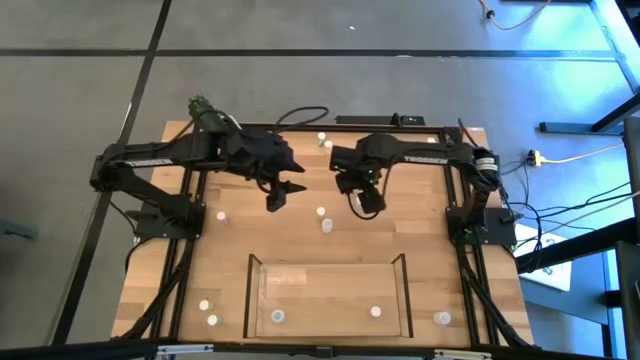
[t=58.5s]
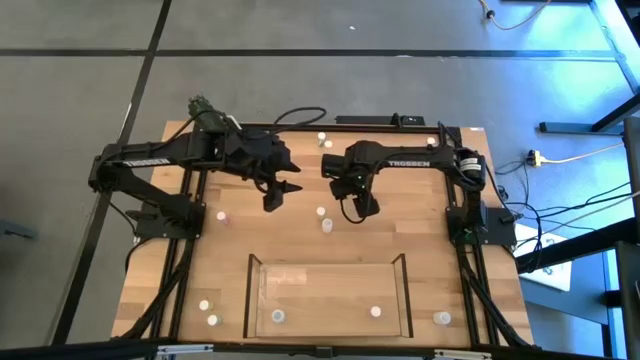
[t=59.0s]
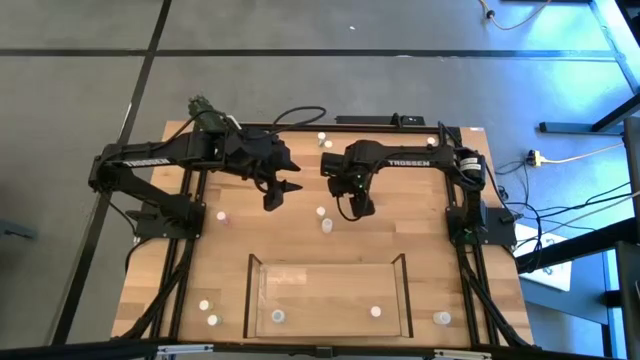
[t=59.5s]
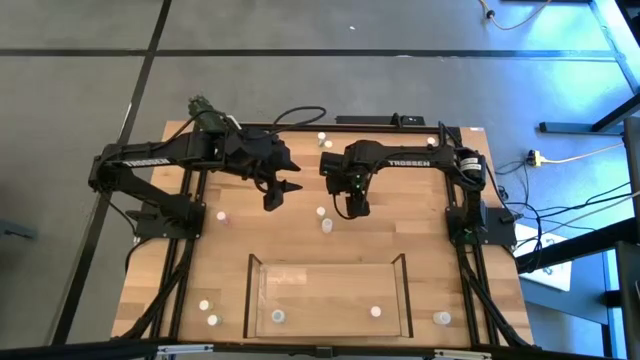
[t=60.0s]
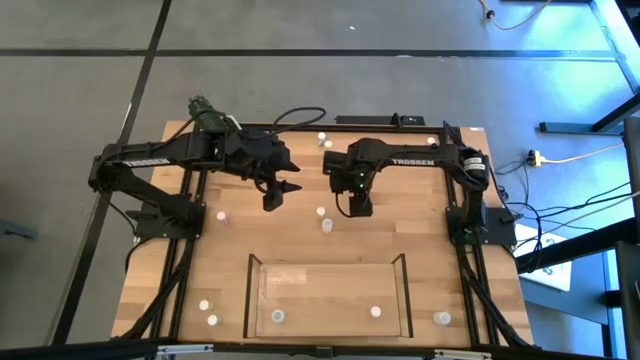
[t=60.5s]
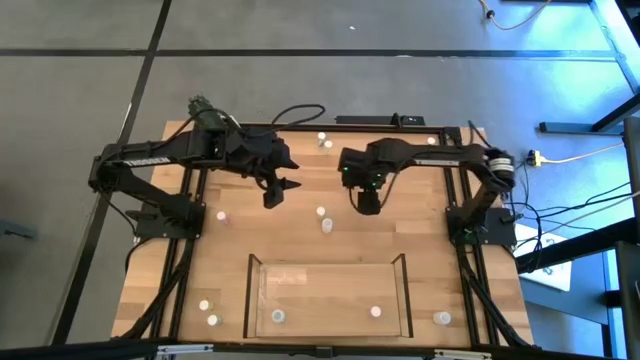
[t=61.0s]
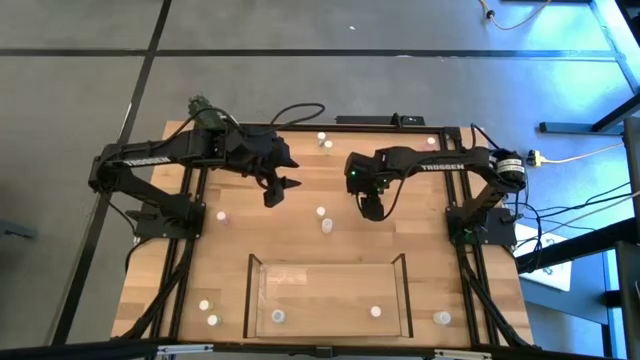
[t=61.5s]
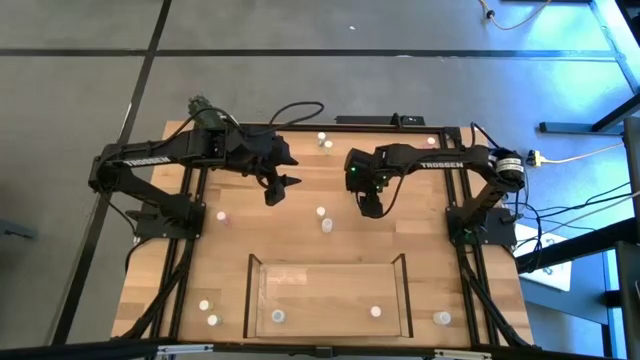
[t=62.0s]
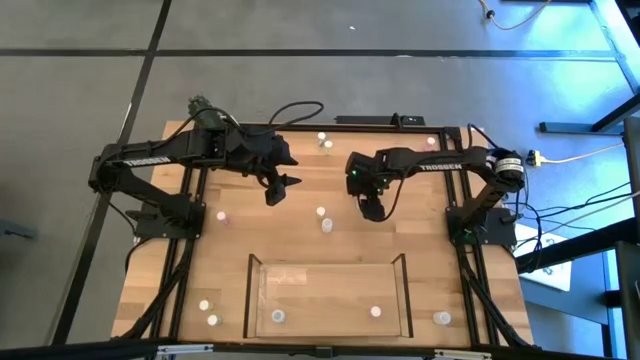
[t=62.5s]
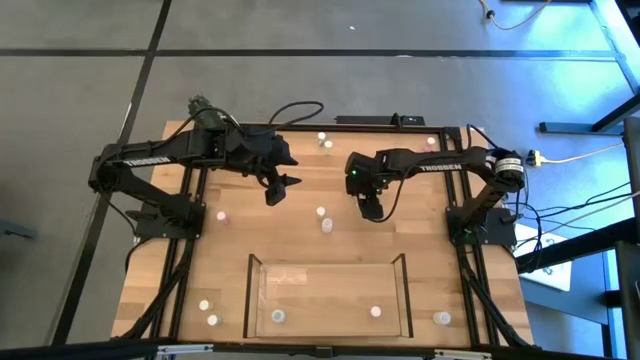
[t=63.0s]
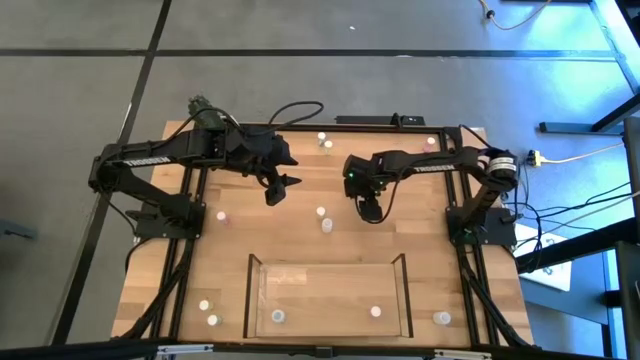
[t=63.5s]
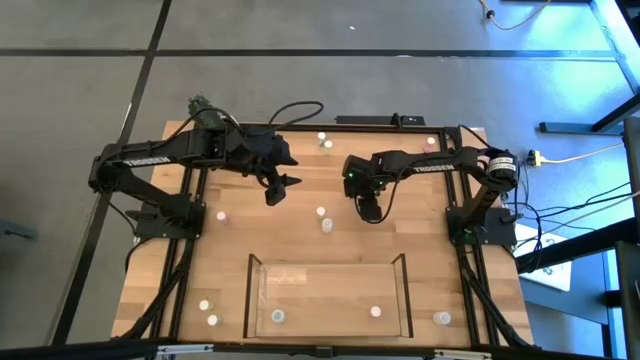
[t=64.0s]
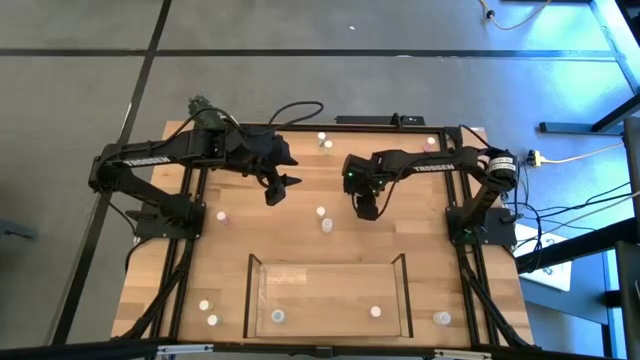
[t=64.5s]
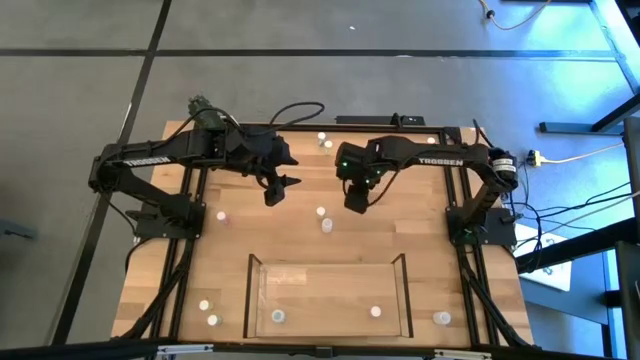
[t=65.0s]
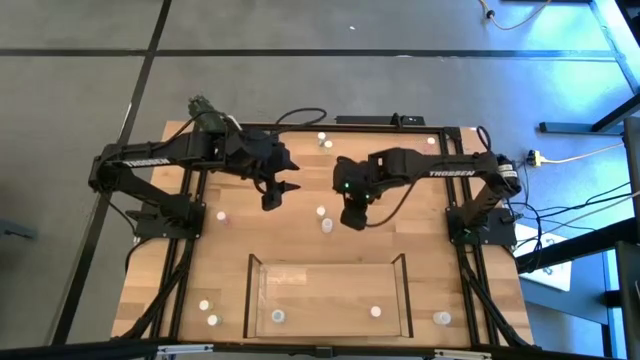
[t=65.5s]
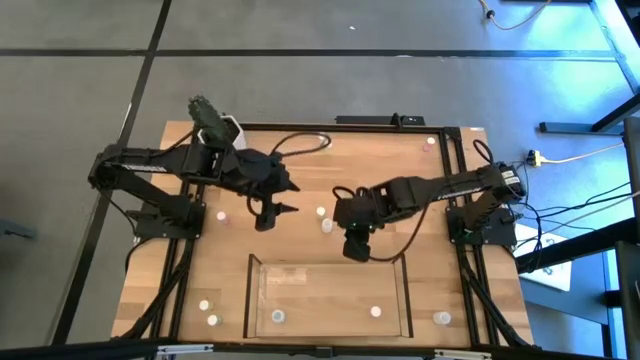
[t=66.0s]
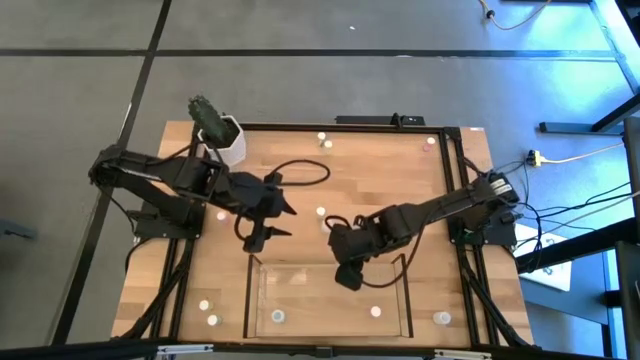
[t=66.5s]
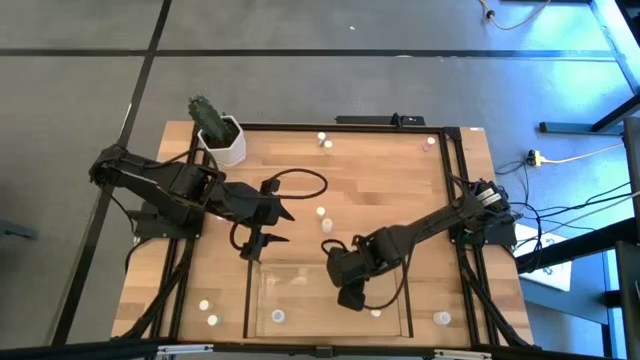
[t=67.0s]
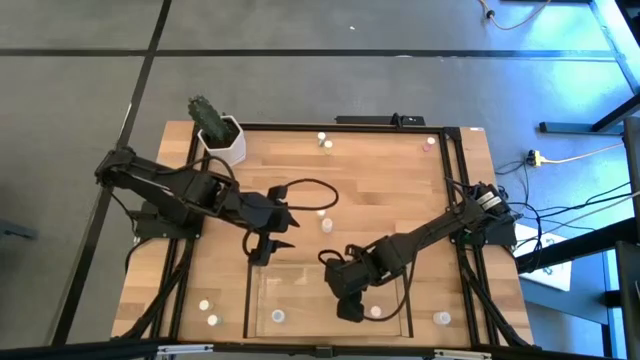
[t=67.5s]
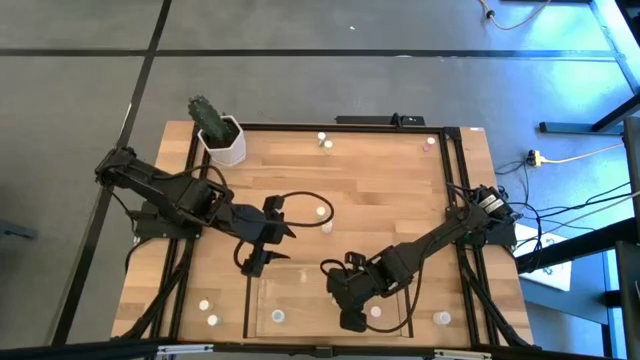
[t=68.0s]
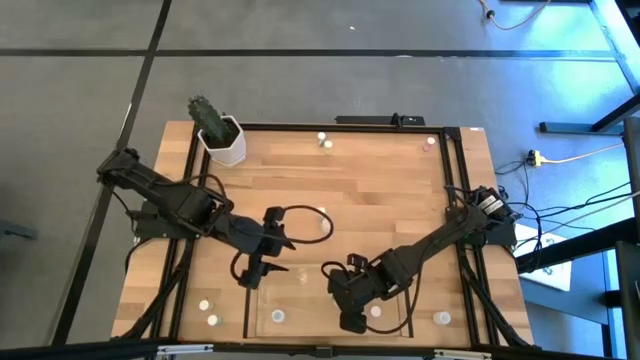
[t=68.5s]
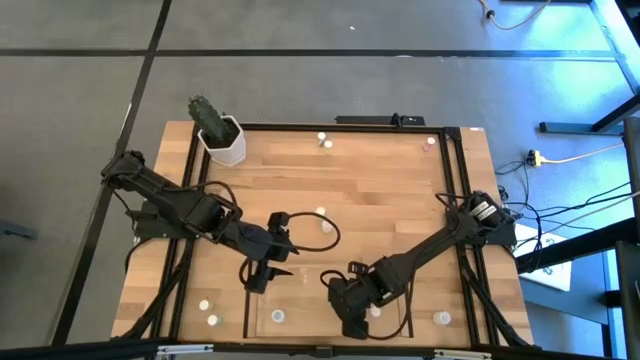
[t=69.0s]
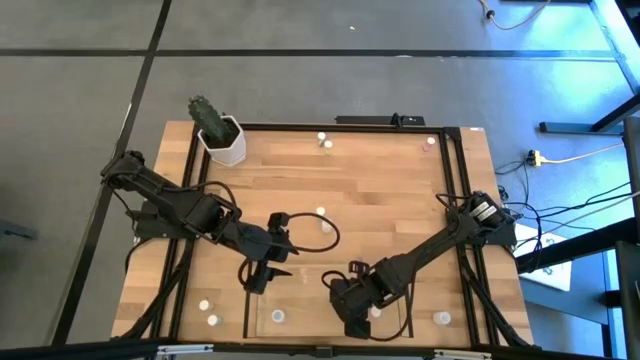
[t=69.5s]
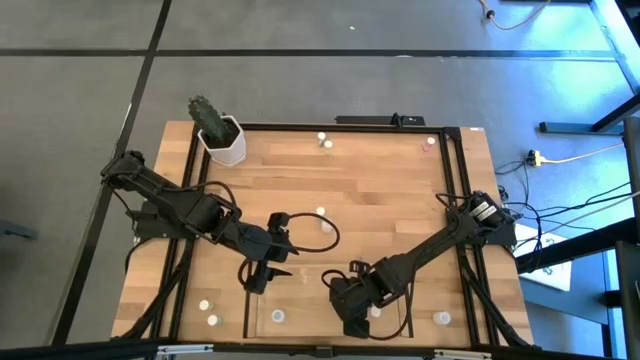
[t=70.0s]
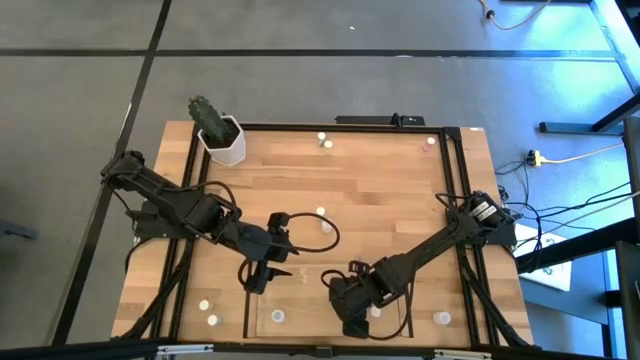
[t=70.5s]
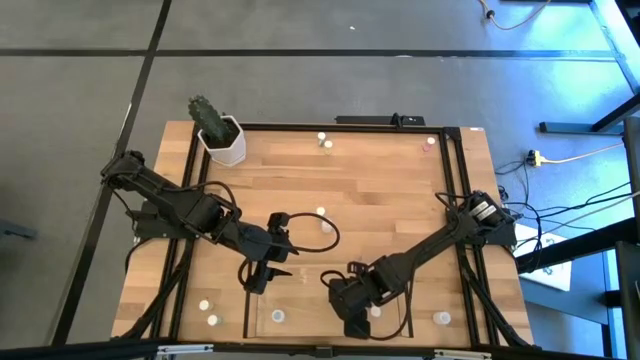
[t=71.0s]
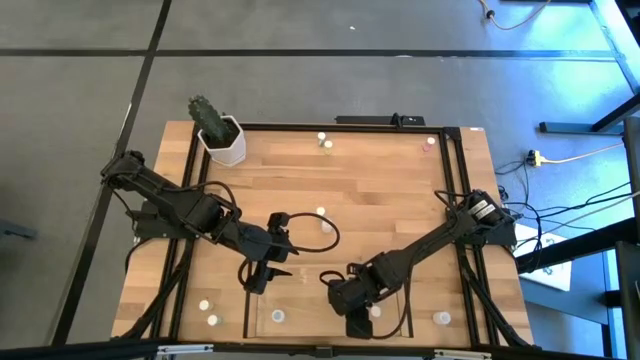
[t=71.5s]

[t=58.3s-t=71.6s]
Task: Pick and place medicine bottles onto shelf by color
Put the right blue pill bottle on the shelf

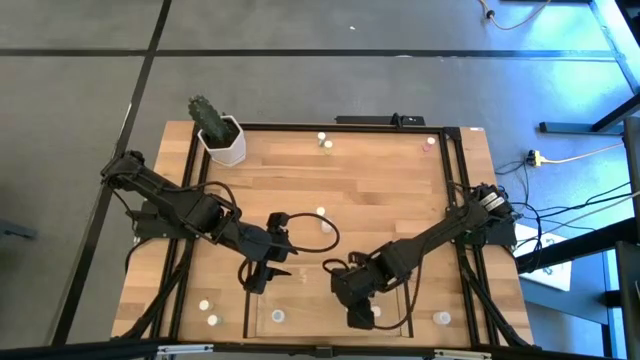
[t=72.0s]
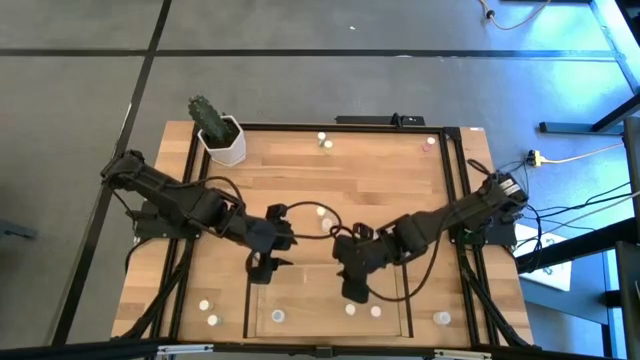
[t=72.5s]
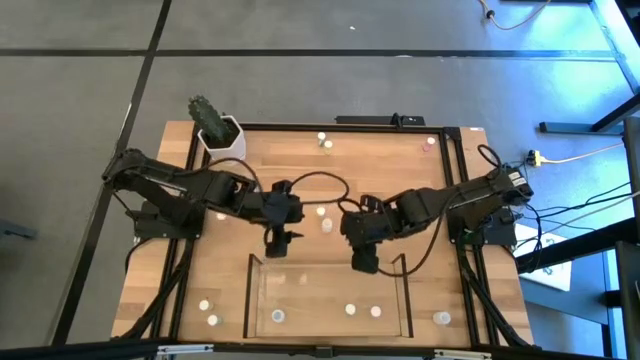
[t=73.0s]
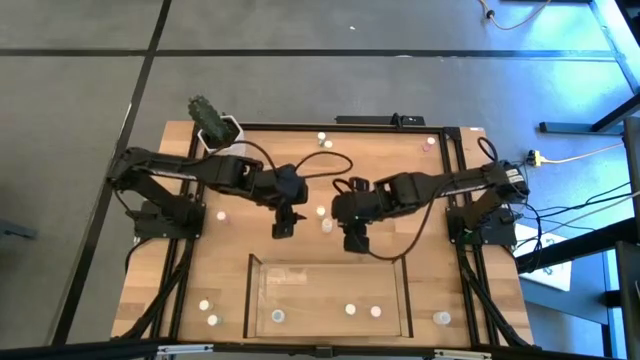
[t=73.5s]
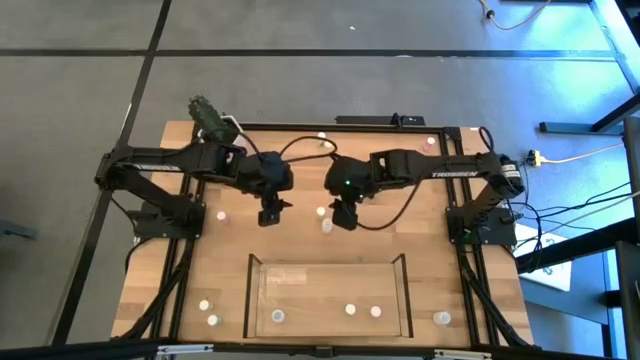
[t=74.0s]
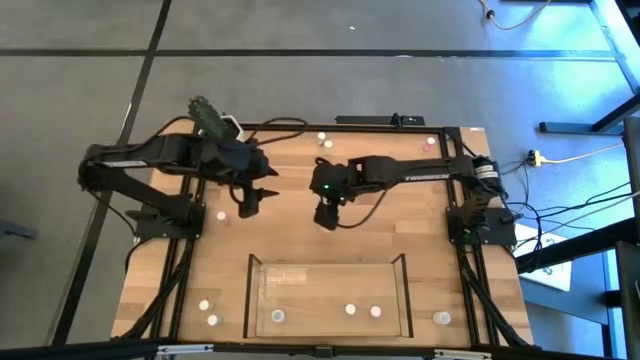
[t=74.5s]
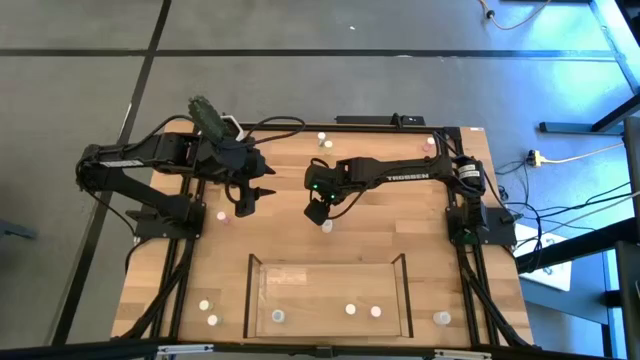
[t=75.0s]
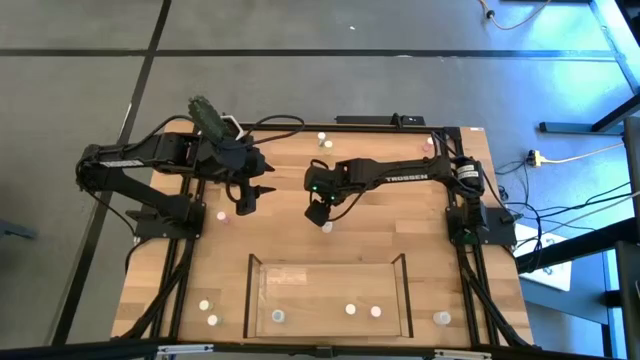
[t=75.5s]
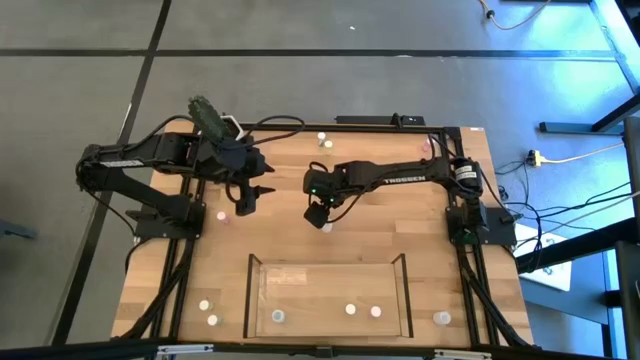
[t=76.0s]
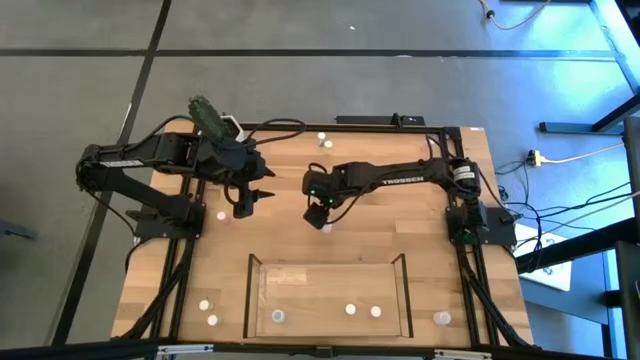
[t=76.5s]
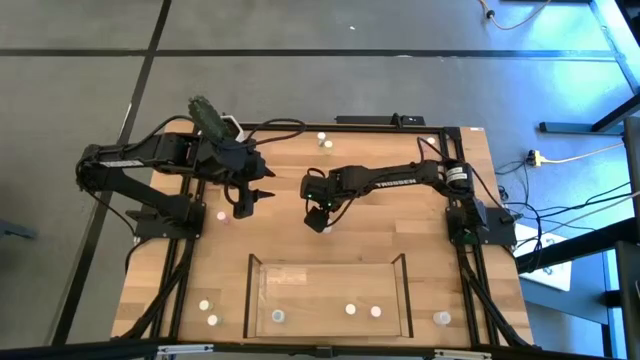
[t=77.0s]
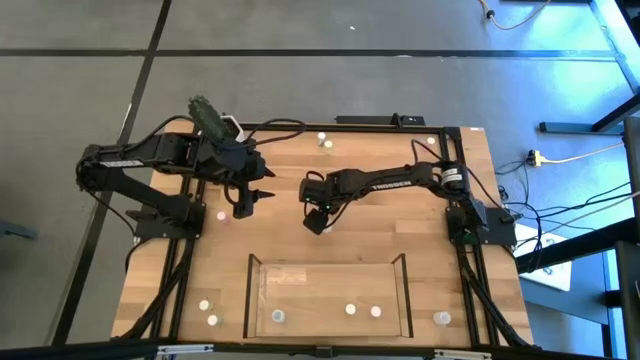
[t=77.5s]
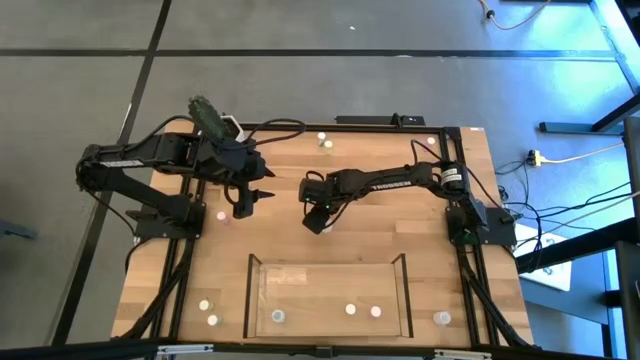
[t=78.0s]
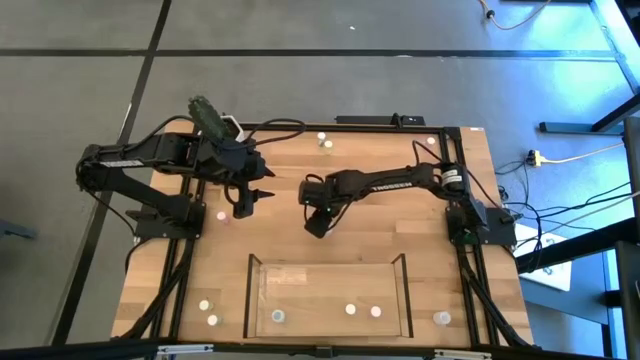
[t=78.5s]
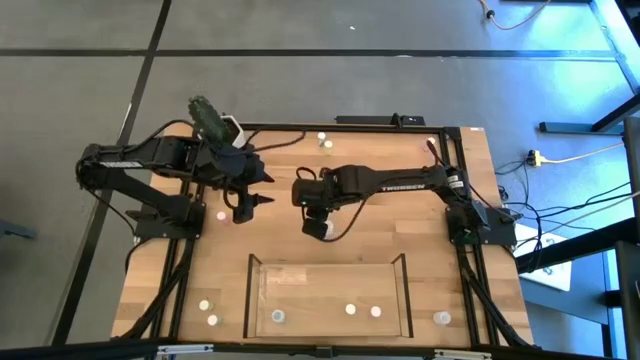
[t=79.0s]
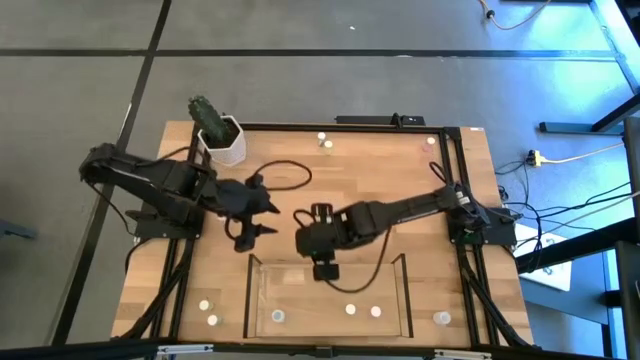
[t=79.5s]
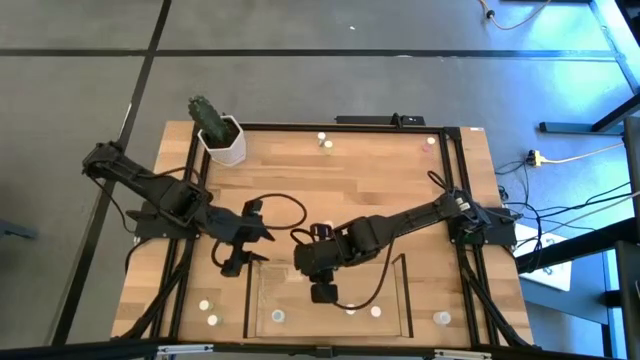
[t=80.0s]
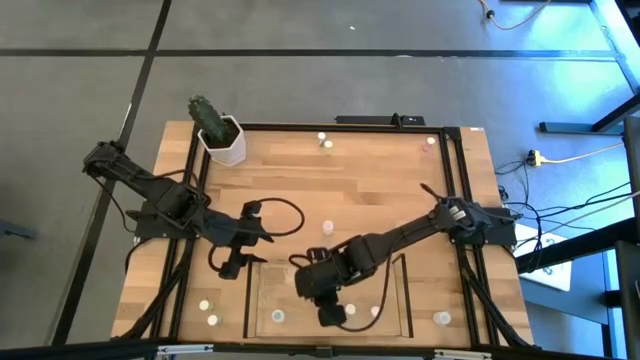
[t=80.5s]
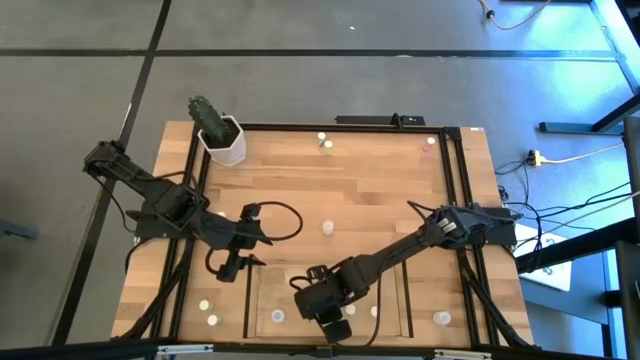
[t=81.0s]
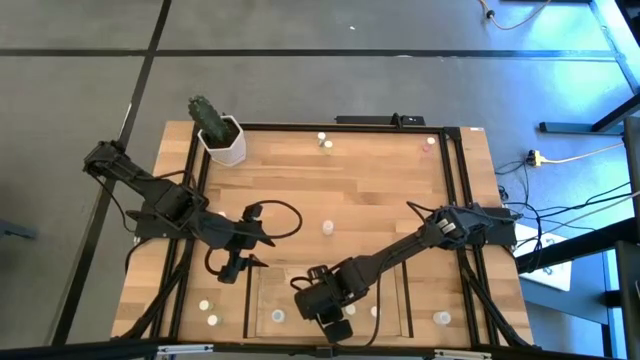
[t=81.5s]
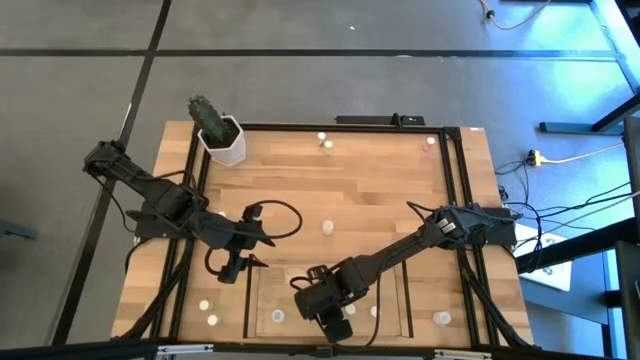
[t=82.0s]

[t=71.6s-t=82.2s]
Put the middle yellow pill bottle on the shelf
